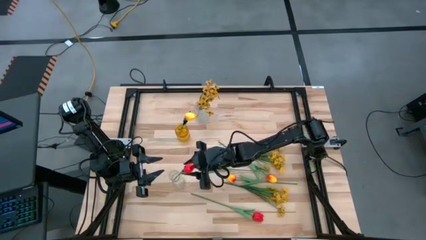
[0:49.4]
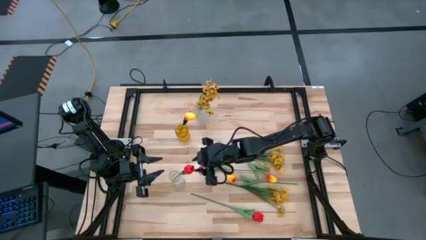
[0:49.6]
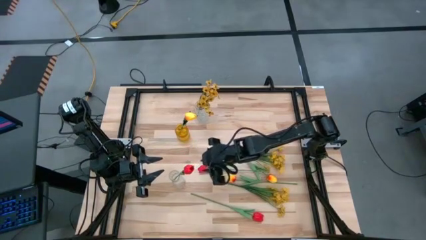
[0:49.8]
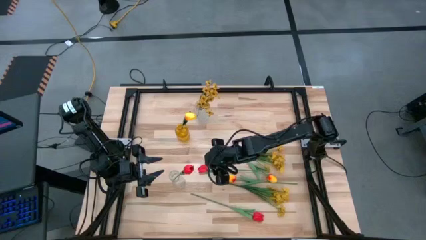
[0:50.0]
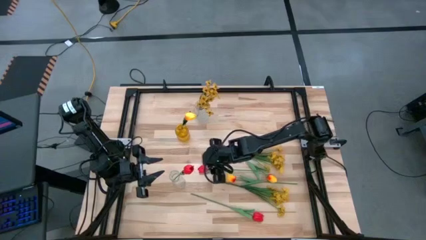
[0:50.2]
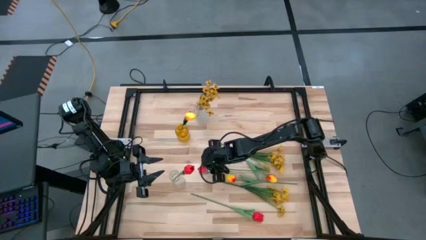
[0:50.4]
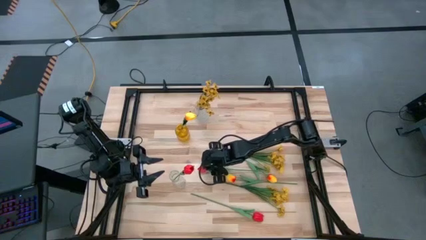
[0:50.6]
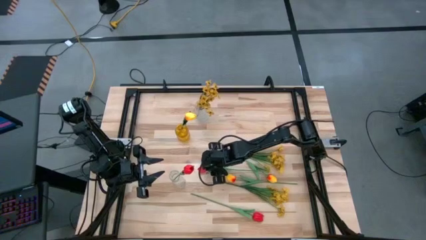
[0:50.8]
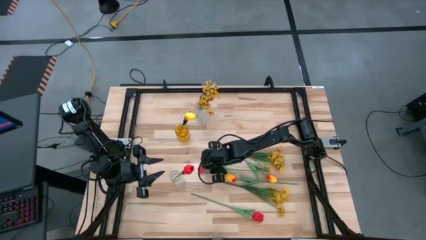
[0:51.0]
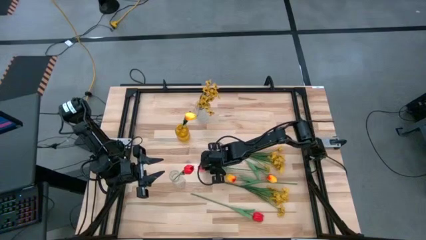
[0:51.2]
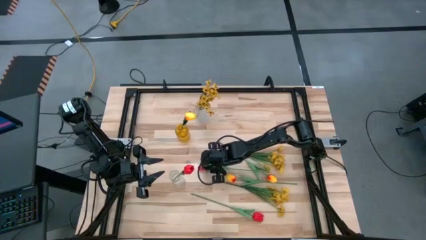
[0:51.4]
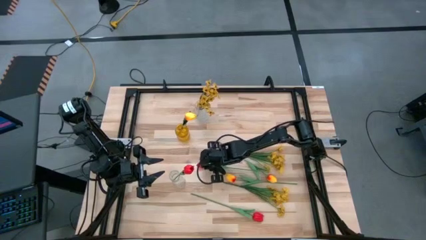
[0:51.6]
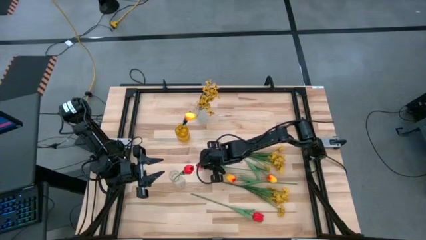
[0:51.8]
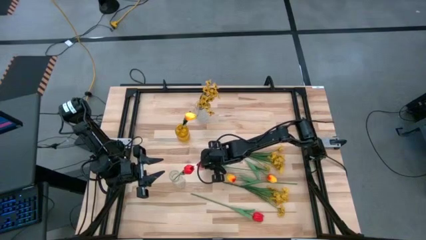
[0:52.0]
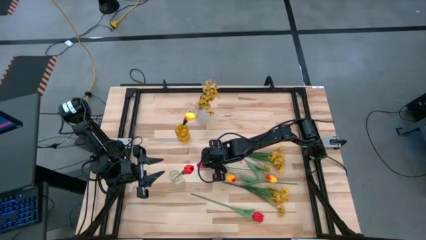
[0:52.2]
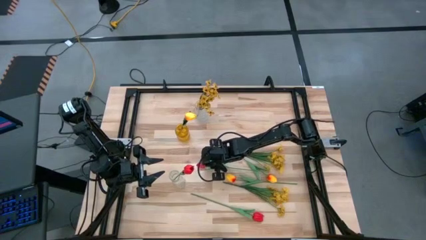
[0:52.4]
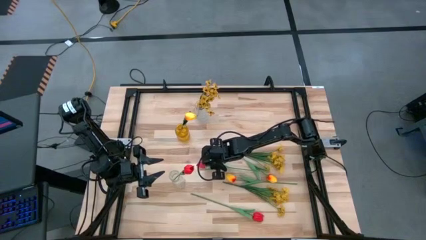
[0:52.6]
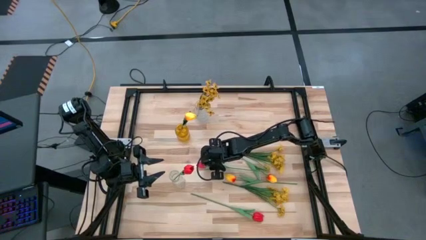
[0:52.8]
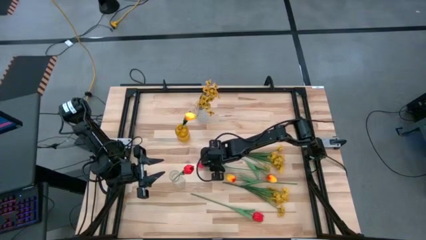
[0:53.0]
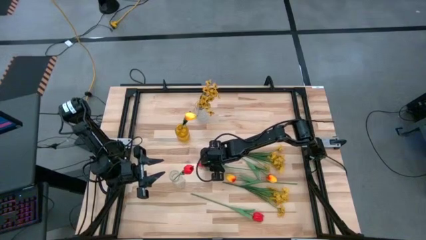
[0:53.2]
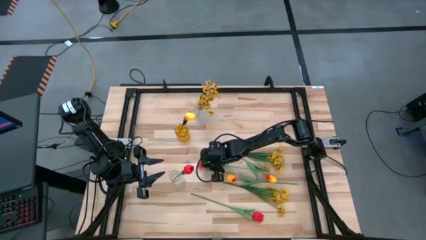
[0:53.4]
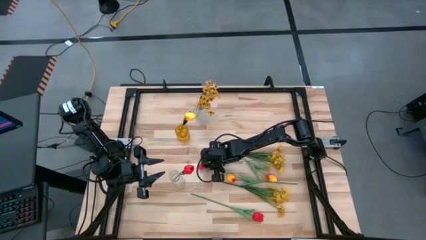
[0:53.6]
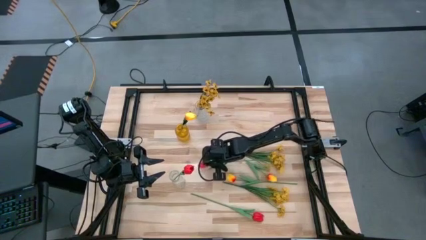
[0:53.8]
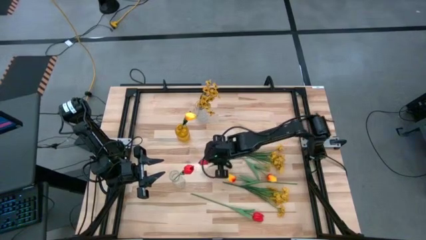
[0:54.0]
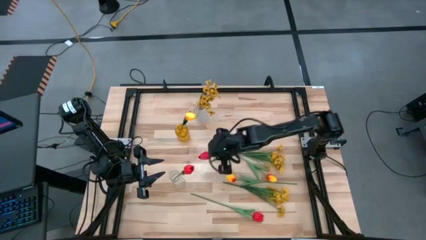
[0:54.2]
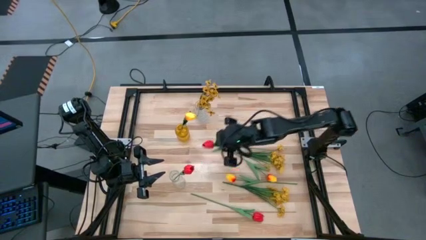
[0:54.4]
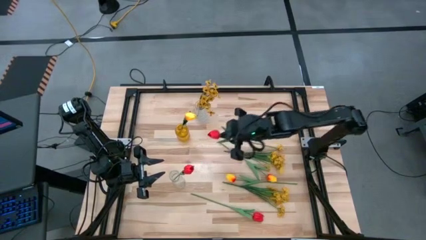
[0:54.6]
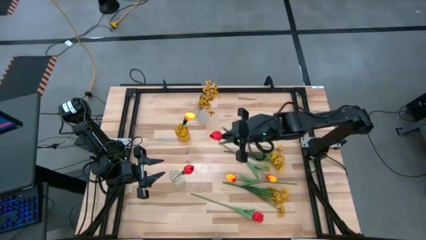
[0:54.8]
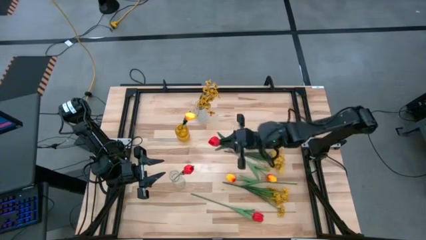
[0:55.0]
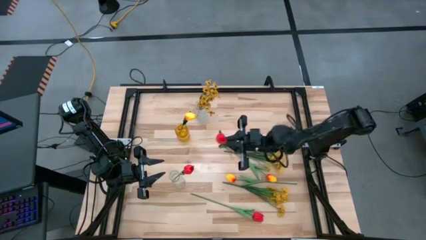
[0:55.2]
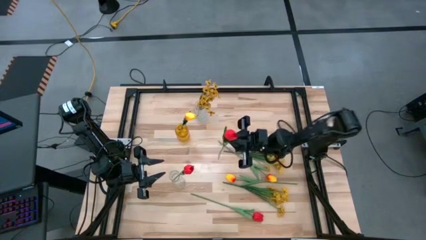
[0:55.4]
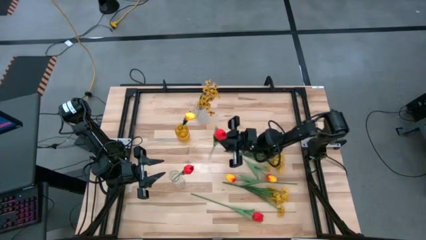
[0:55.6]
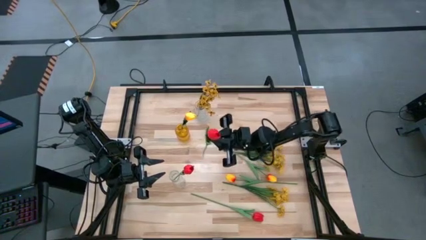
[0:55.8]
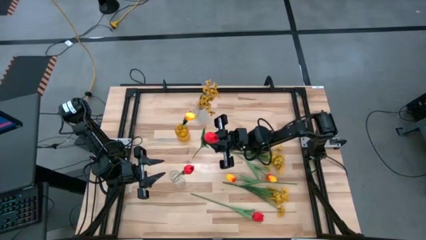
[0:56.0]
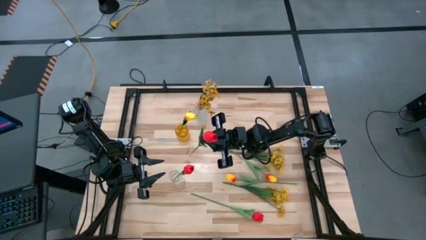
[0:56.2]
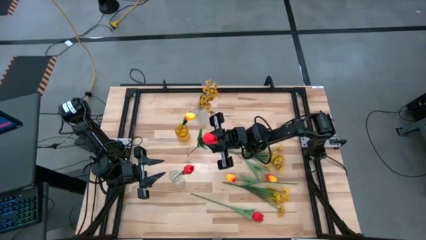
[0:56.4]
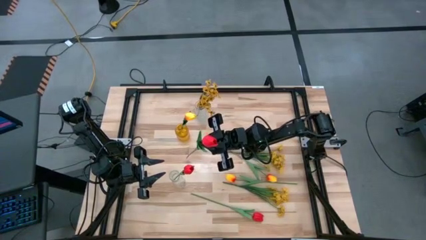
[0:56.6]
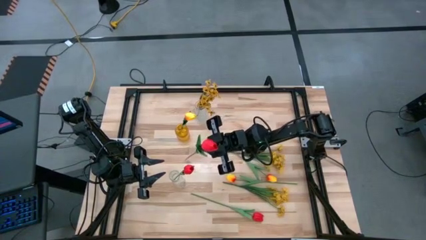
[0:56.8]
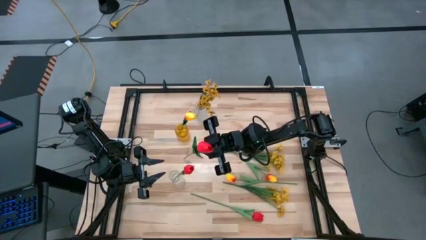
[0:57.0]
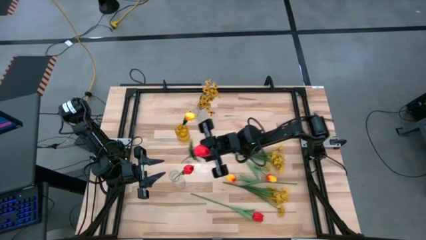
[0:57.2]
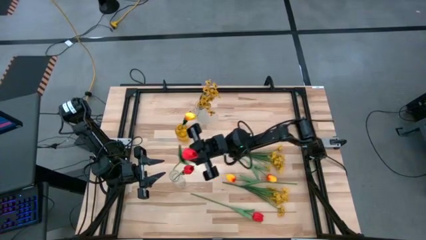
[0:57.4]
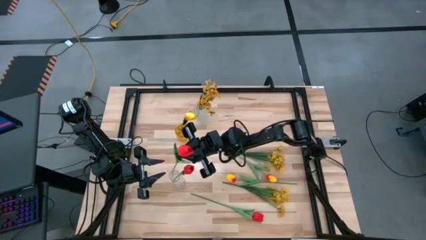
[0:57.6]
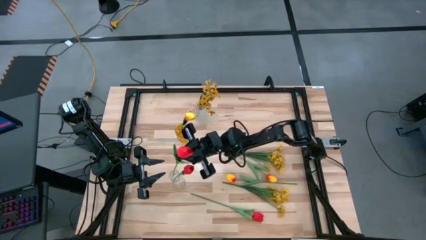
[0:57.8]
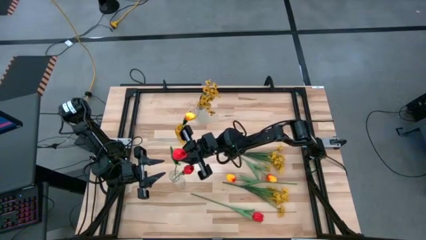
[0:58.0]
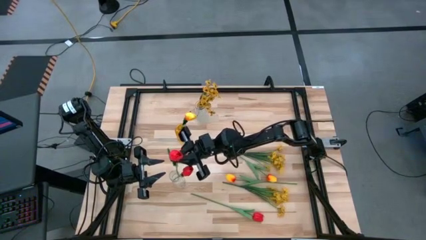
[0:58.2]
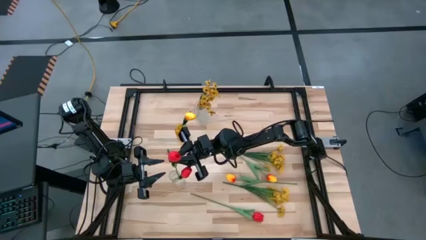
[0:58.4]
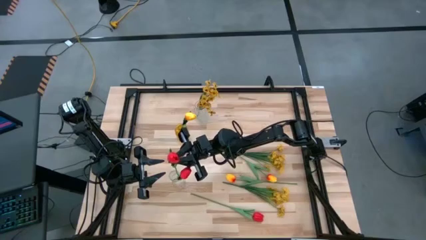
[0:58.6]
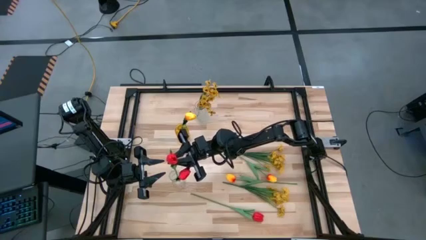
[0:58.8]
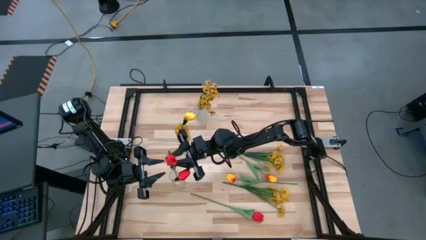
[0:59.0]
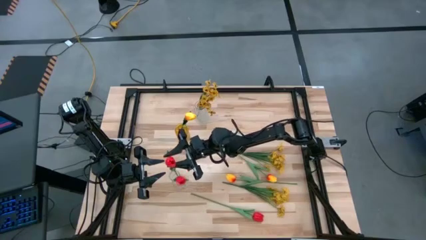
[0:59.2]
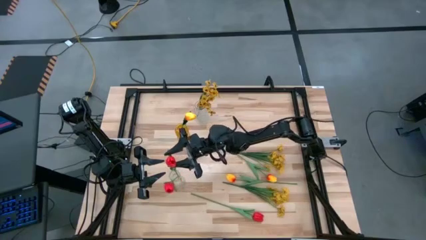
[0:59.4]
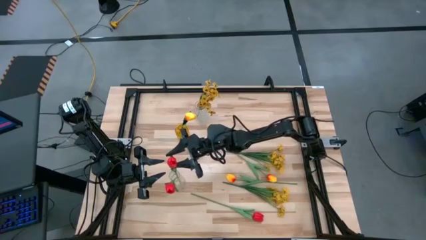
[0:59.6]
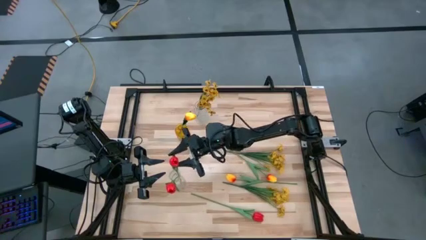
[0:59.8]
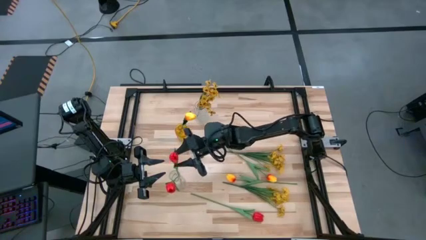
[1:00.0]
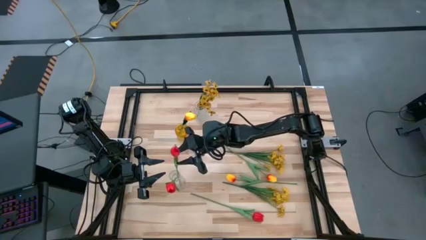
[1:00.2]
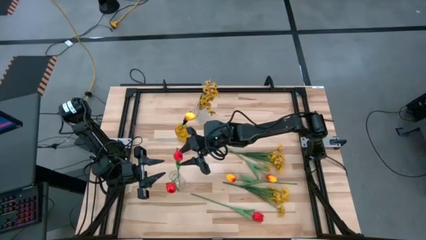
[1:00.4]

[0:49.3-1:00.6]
Task: Sort flowers into vase by color
Put the top red tulip into the bottom transparent vase
